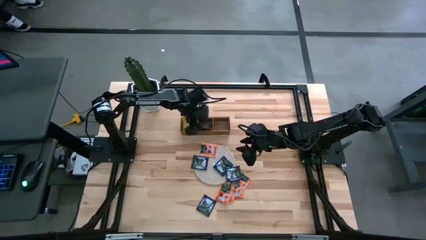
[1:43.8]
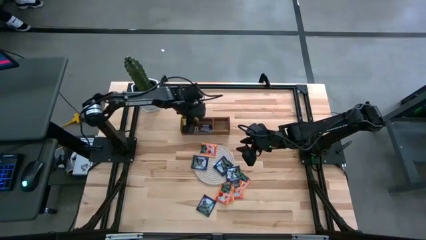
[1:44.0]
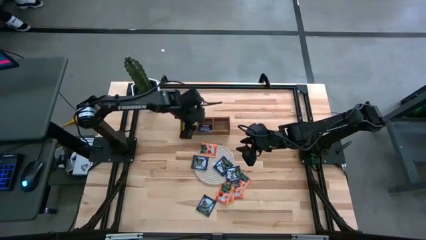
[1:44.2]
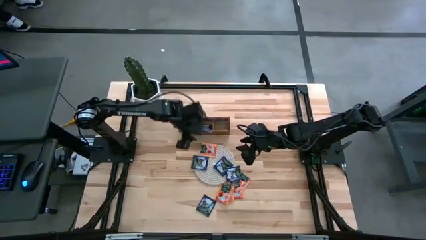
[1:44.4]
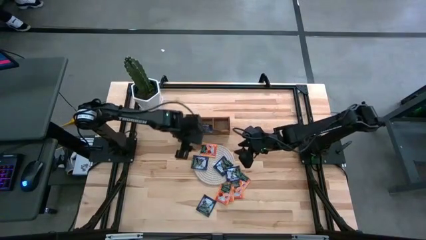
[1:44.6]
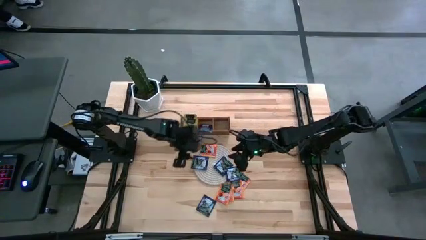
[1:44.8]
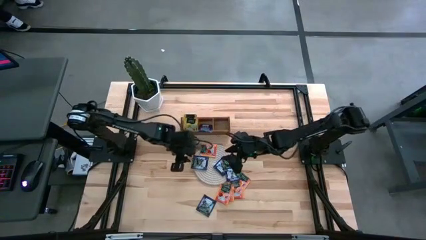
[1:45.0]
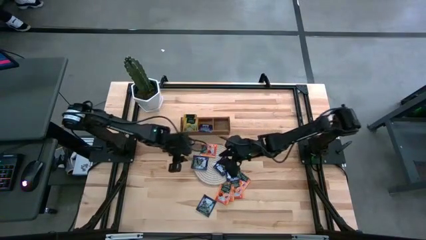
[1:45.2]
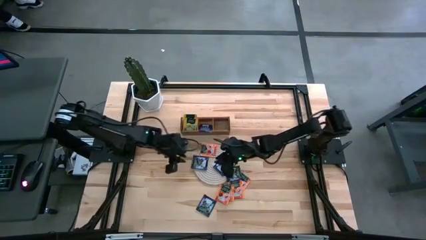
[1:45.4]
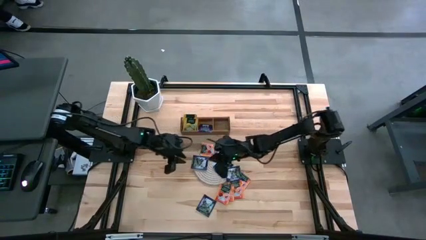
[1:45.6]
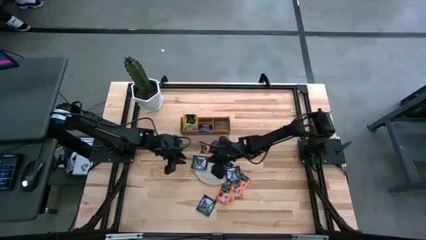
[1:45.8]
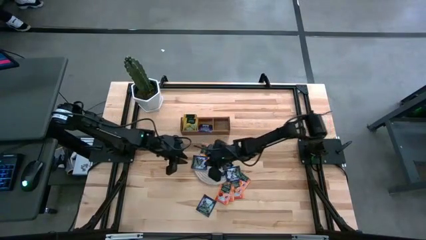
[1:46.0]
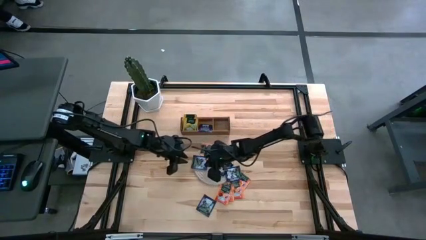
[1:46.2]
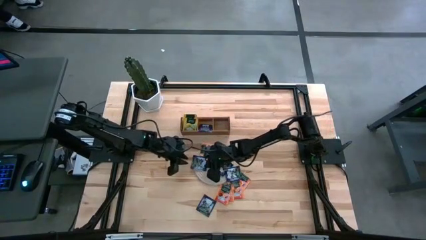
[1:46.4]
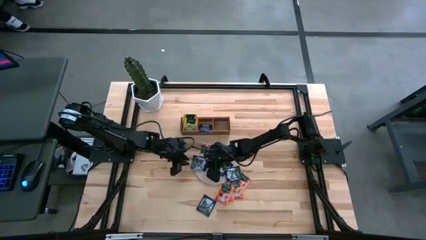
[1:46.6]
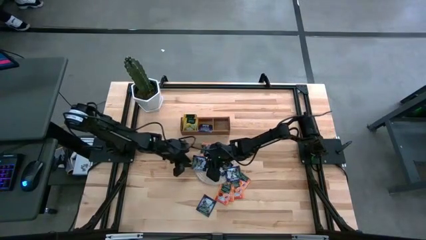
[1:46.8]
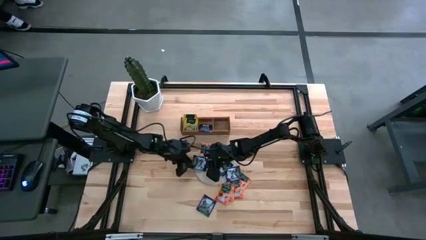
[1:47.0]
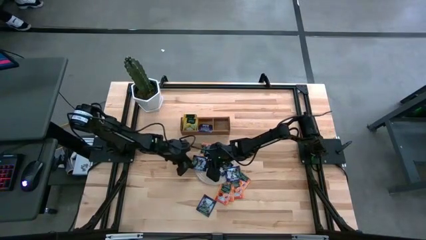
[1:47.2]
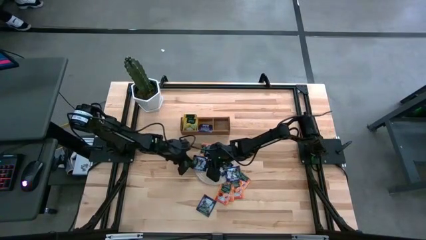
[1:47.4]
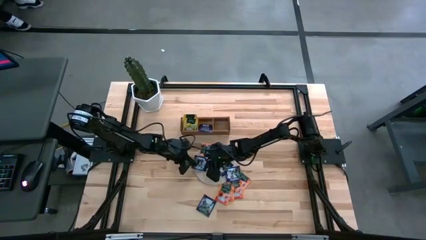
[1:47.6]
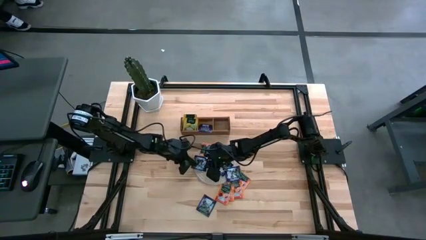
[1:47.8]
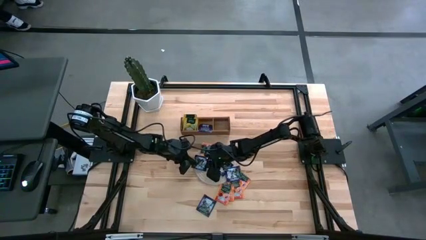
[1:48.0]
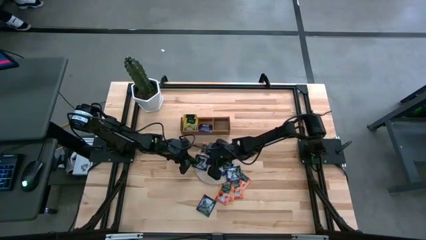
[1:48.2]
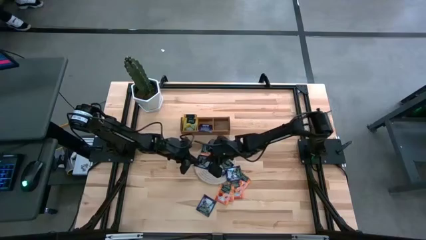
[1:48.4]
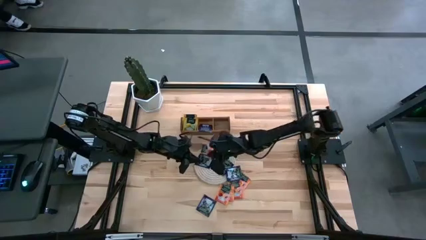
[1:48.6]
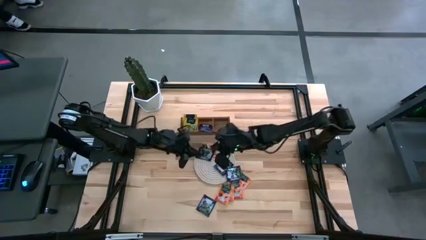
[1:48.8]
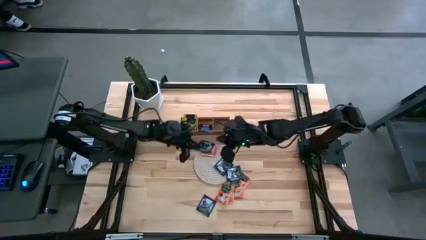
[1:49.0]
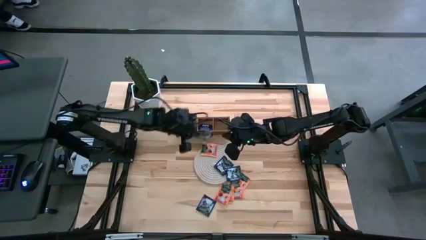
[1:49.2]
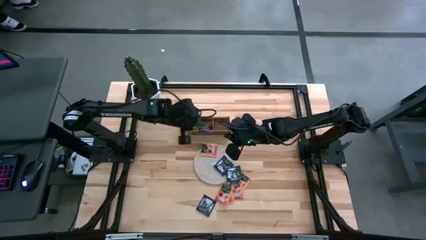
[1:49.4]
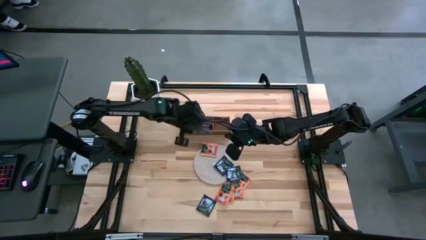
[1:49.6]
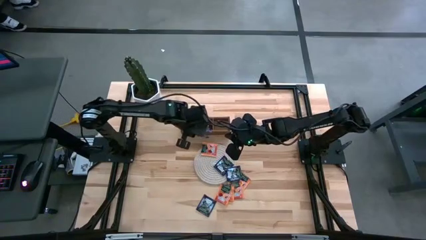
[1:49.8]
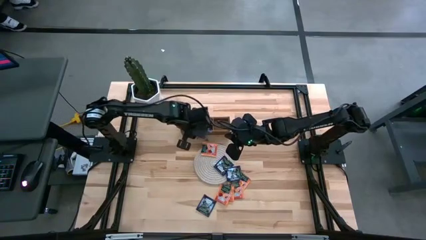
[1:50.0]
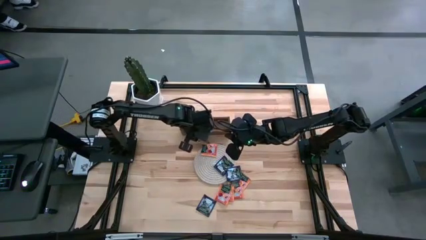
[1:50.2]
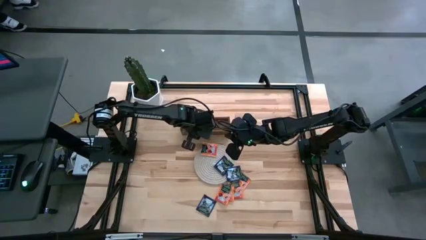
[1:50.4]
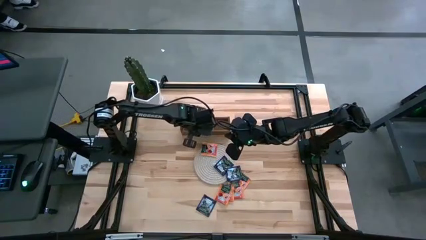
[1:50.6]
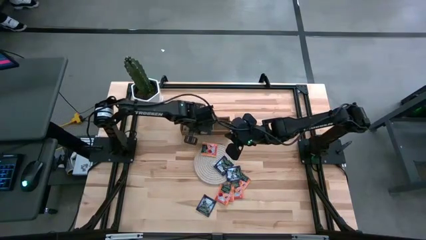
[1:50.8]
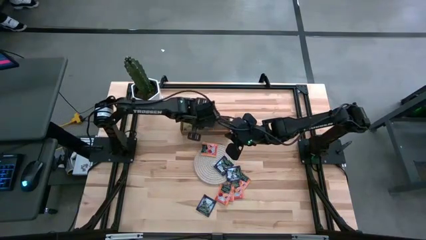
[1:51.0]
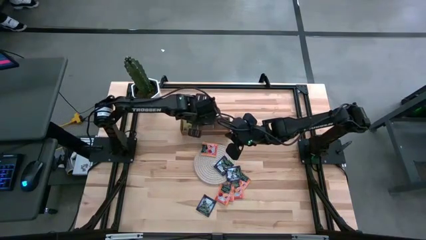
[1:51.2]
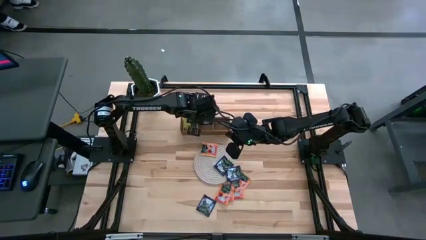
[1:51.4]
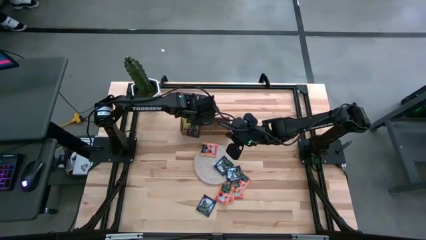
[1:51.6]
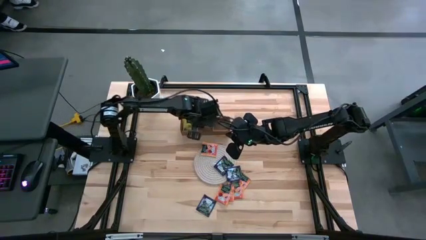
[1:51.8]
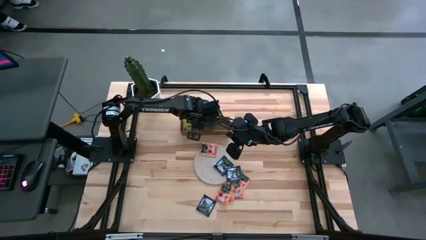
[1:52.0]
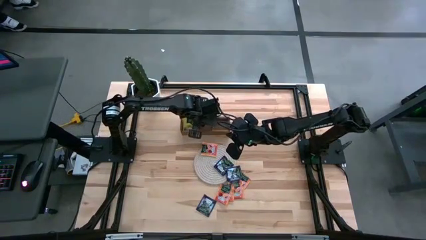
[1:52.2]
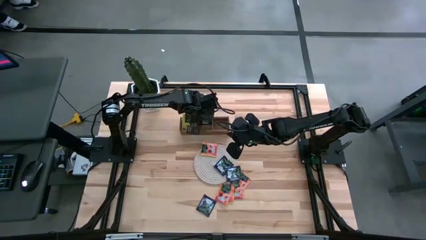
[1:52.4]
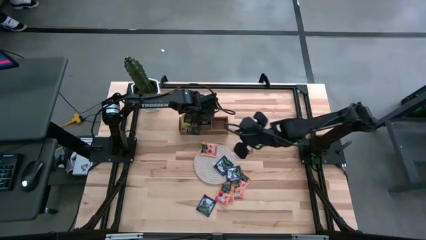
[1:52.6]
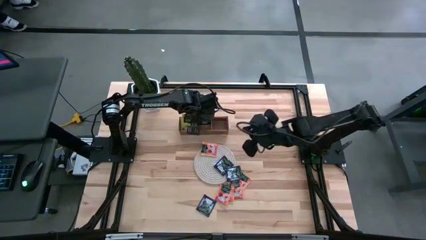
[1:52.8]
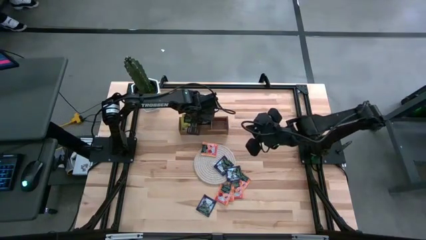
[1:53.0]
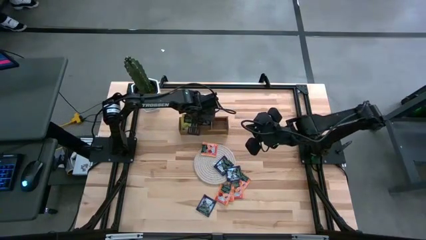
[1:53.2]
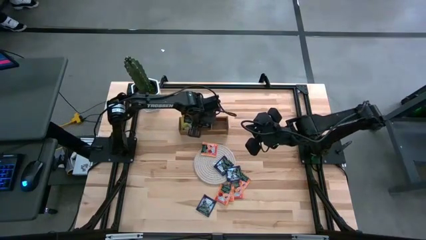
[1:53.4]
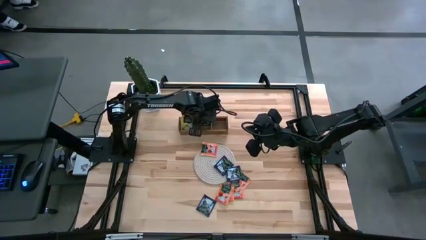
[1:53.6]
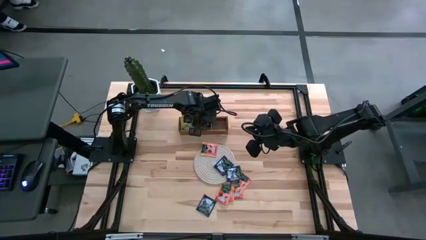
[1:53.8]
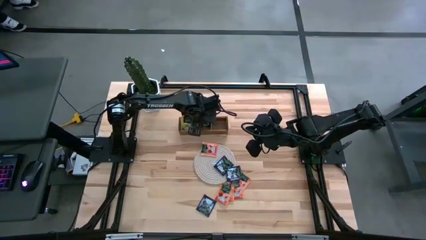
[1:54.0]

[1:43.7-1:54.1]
Task: Pick & Place Tea
Put the purple tea bag into the middle section of the wooden organizer

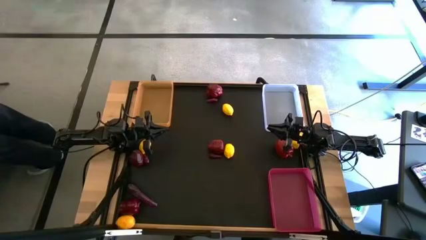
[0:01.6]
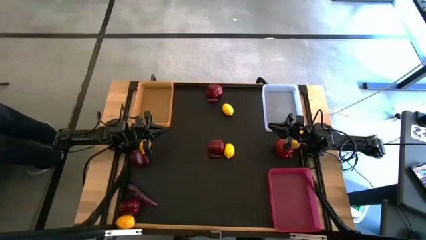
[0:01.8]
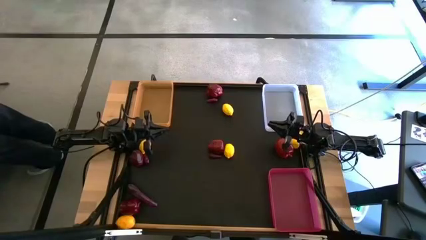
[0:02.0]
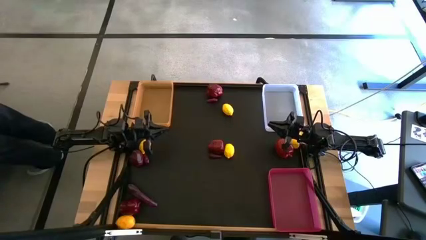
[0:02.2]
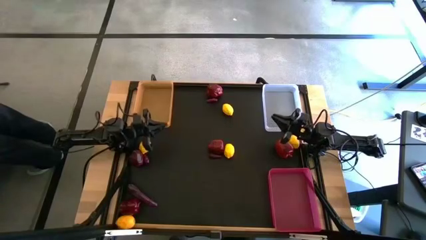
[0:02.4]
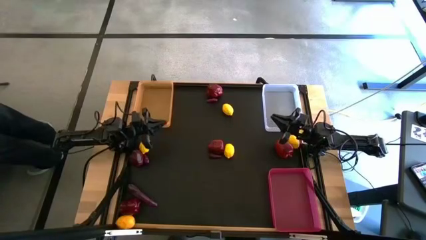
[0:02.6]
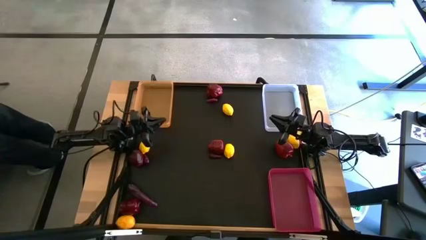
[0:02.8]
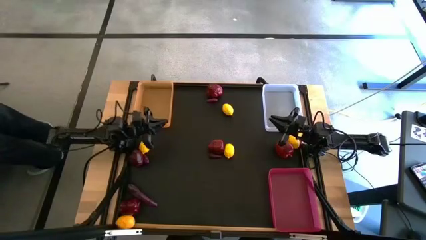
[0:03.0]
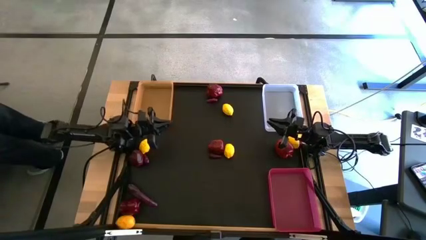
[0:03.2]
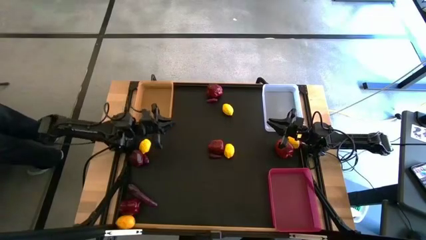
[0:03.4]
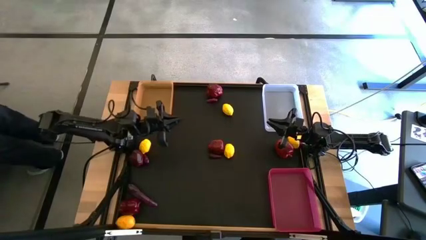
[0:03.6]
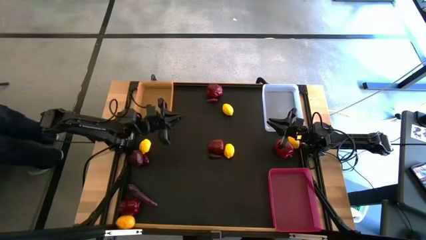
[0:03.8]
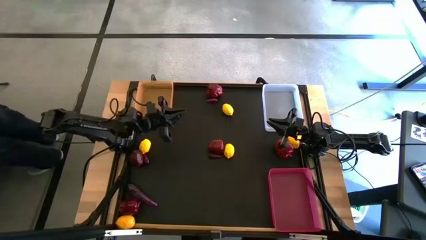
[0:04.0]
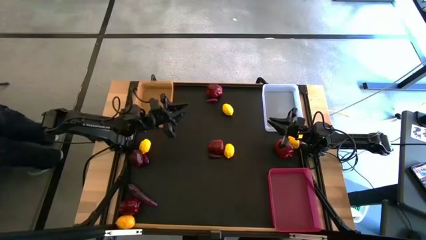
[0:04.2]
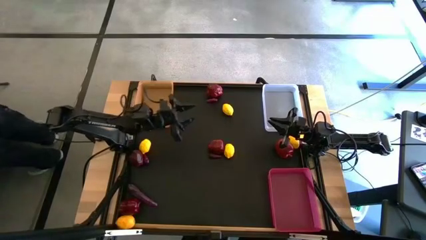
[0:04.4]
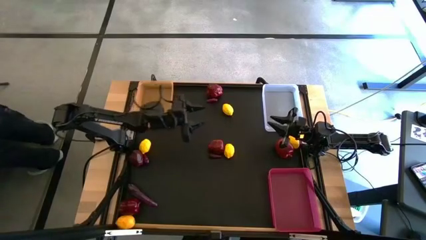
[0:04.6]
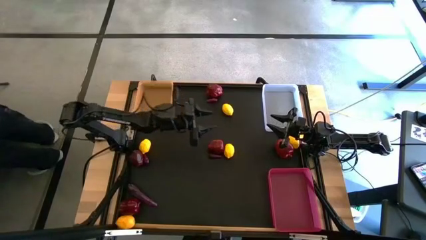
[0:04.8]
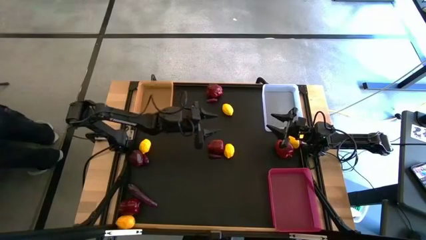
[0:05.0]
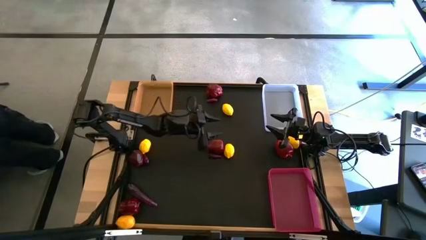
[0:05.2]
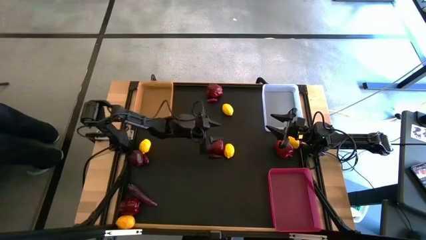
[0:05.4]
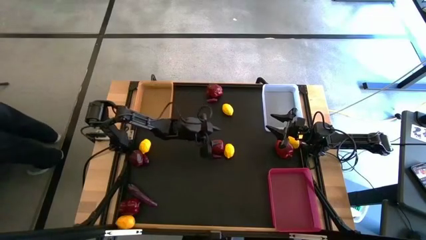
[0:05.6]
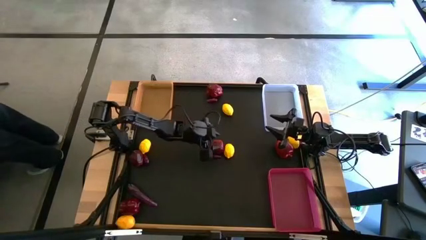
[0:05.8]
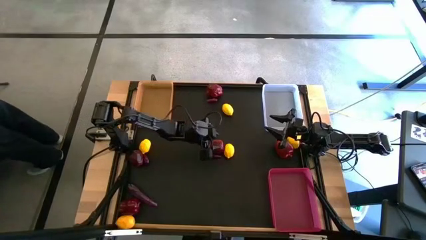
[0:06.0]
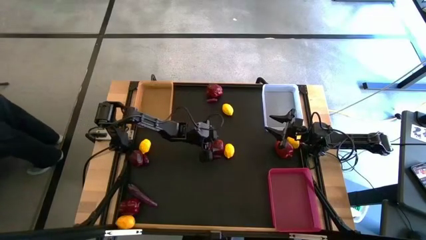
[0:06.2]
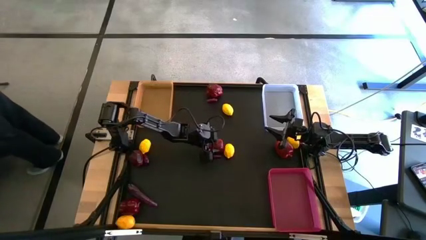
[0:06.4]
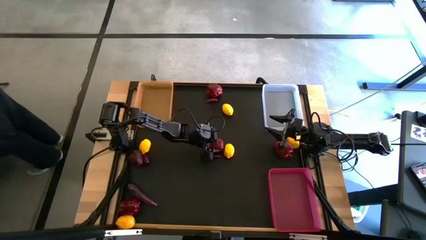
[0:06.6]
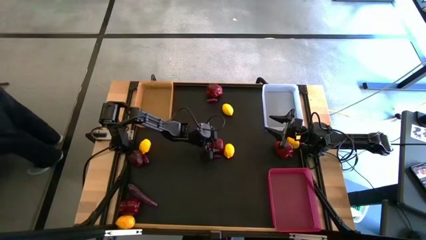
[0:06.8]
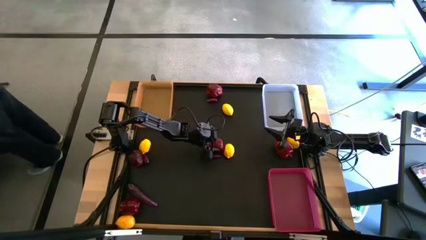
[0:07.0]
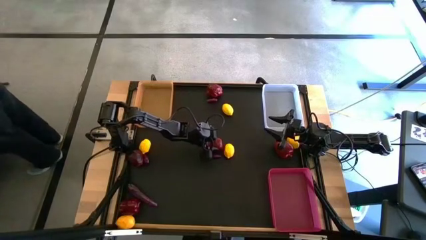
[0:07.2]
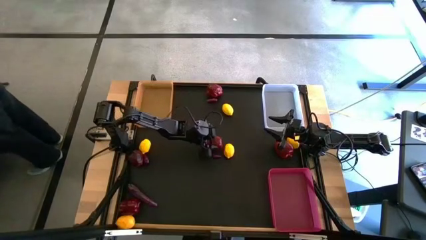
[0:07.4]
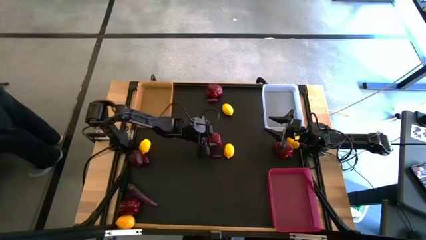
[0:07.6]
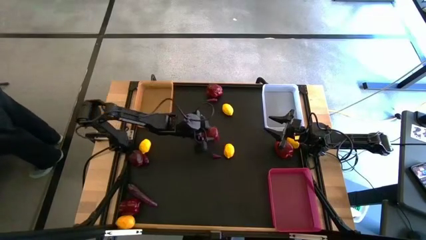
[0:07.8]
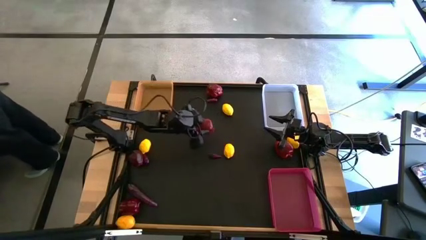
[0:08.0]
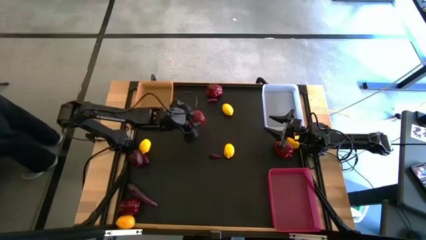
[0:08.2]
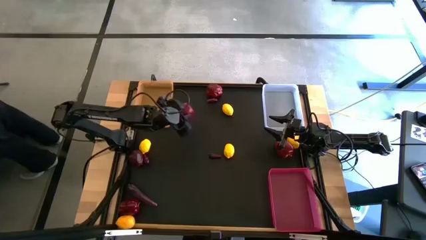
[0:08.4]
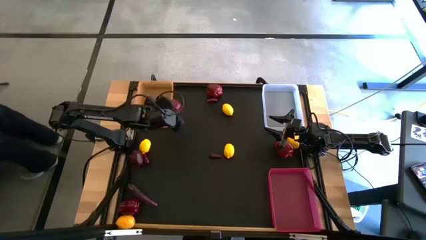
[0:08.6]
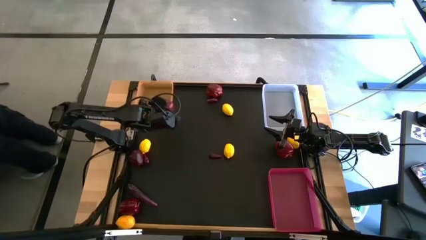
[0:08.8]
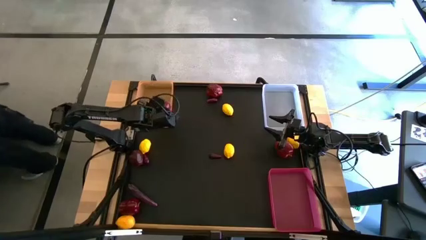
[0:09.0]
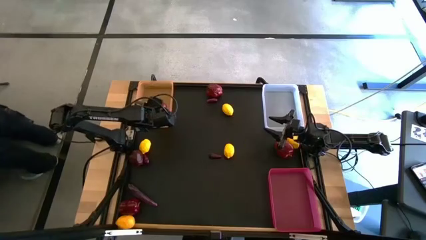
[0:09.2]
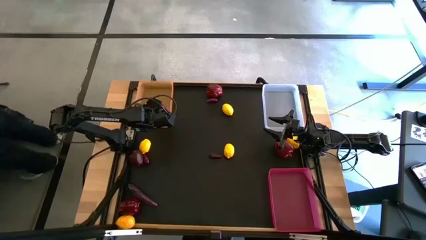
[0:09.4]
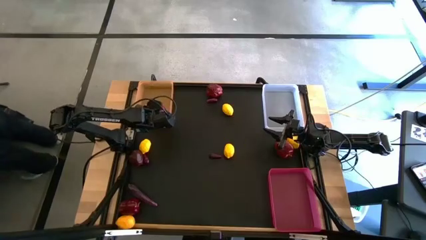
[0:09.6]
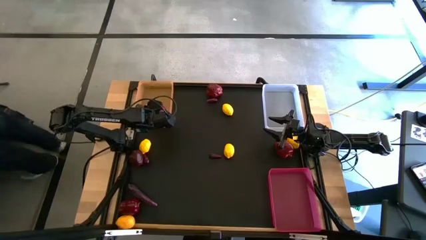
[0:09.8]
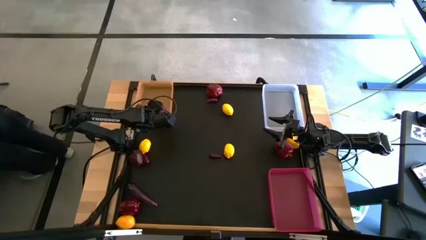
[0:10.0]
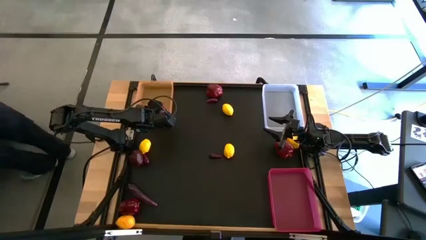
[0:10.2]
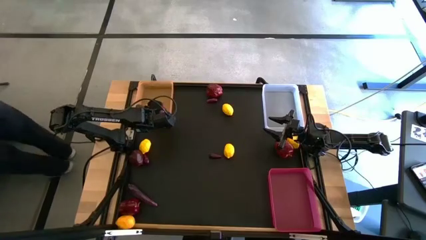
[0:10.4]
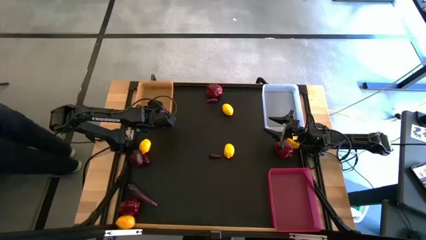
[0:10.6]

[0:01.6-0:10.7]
Task: Sort produce into baskets
Put the apple into the orange bin
